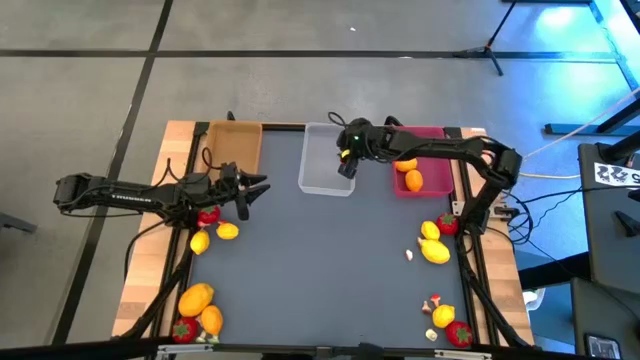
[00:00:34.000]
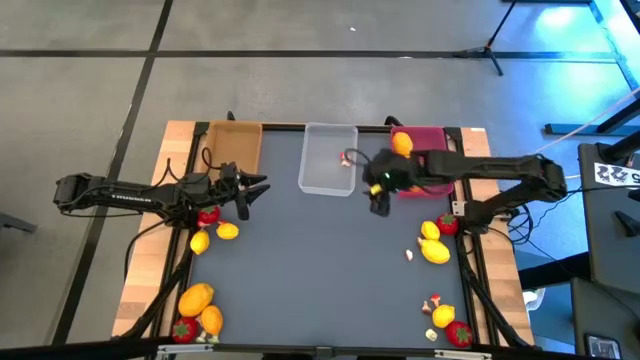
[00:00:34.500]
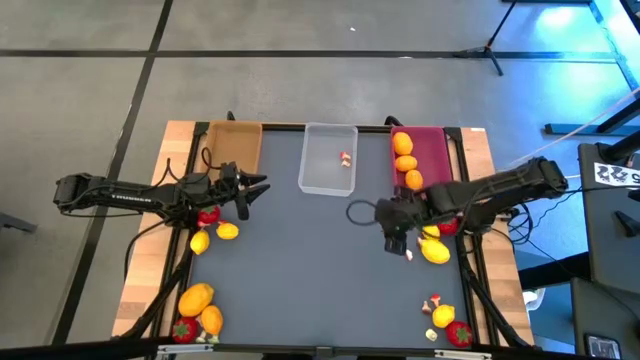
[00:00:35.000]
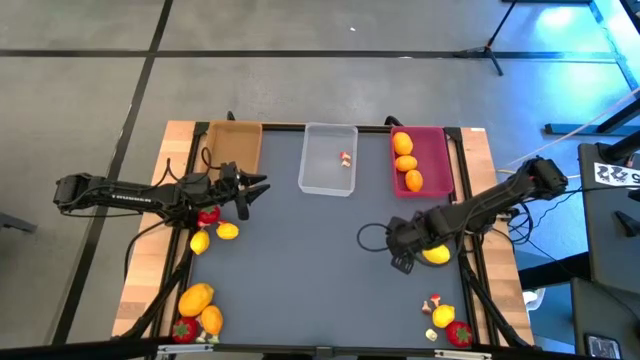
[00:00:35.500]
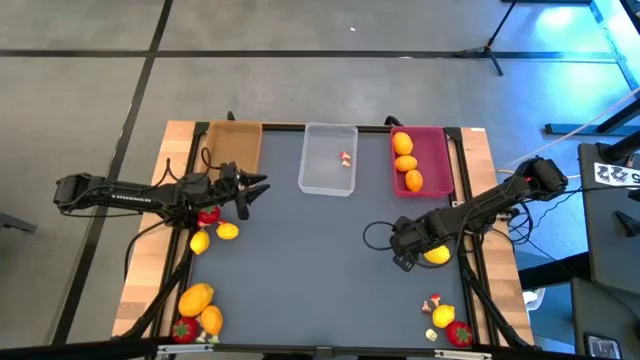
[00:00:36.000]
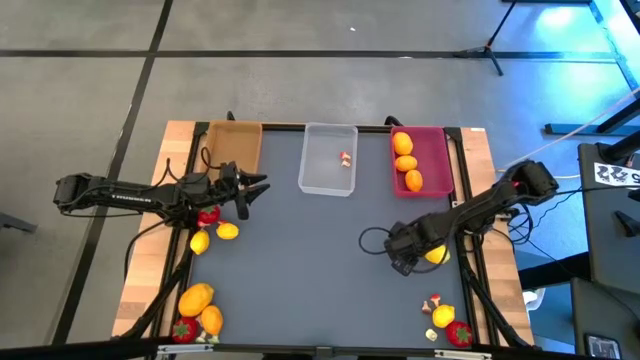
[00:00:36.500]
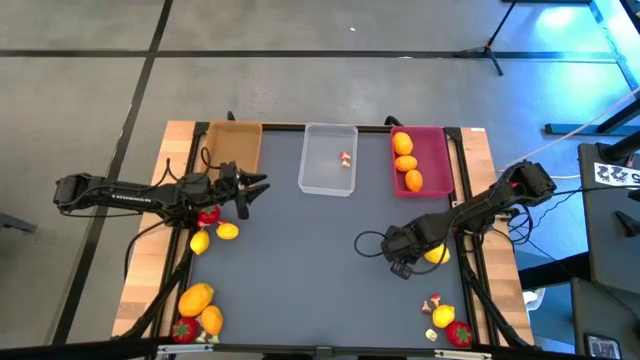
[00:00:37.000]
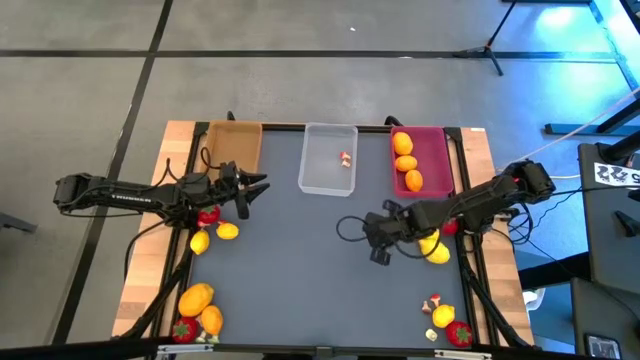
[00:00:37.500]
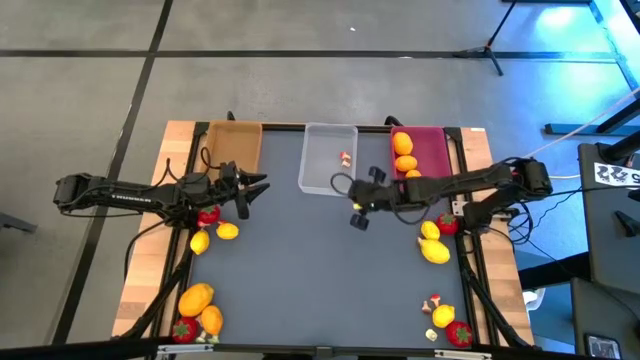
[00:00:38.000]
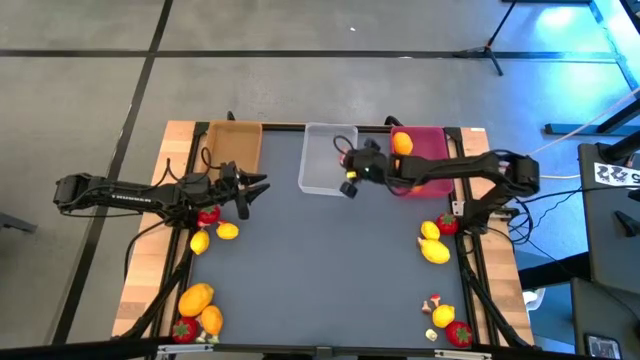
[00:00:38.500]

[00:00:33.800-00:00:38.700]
Task: Sort produce into baskets
Put the mushroom into the transparent bin

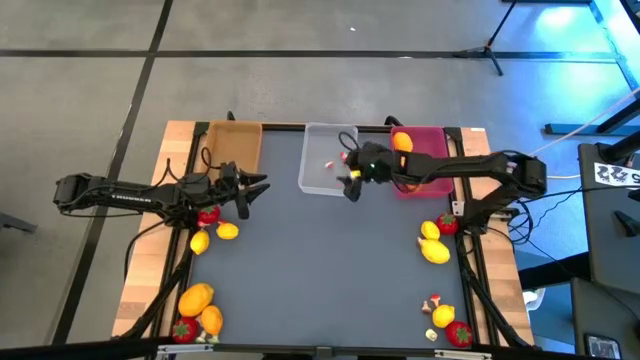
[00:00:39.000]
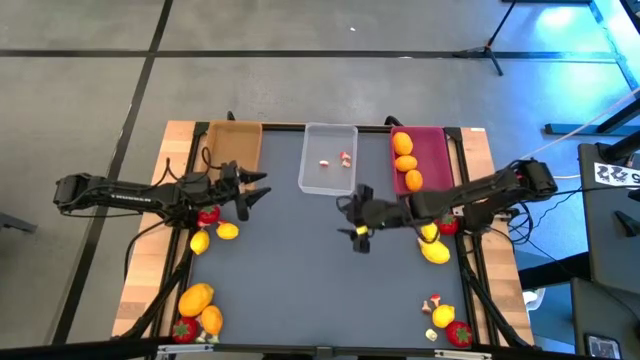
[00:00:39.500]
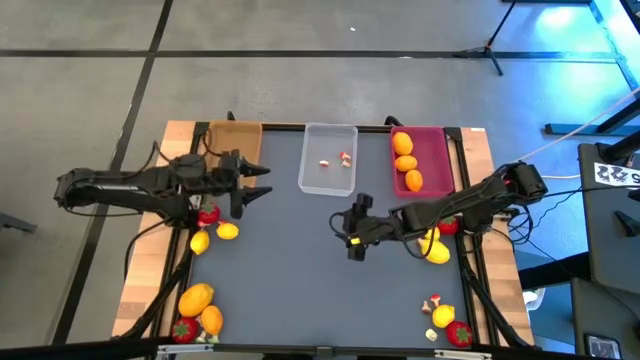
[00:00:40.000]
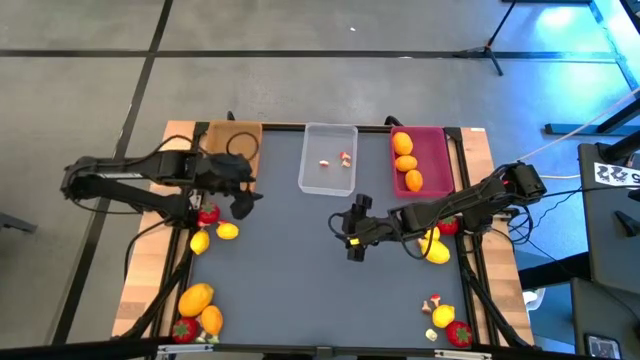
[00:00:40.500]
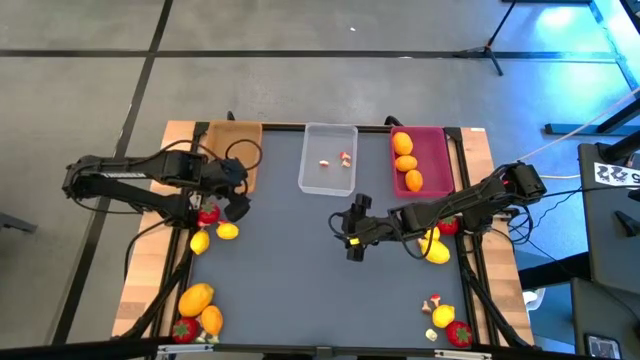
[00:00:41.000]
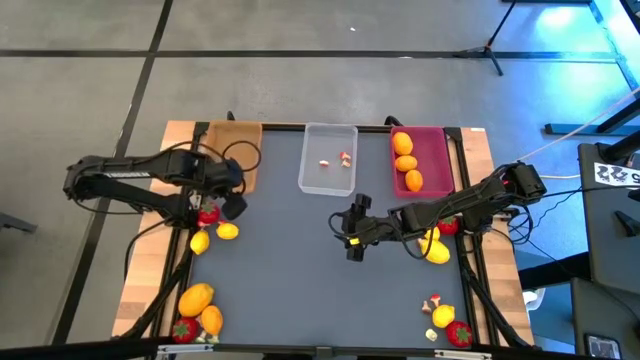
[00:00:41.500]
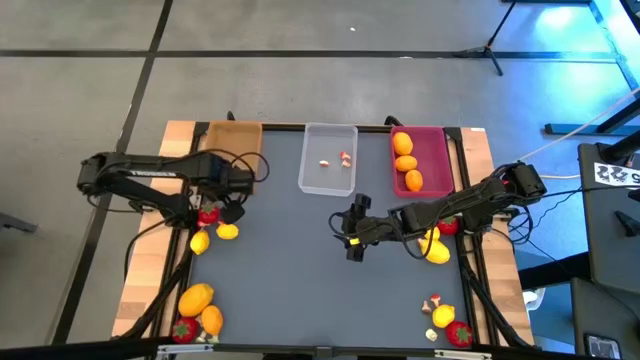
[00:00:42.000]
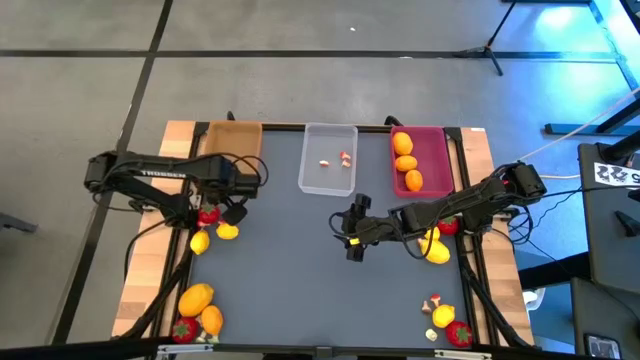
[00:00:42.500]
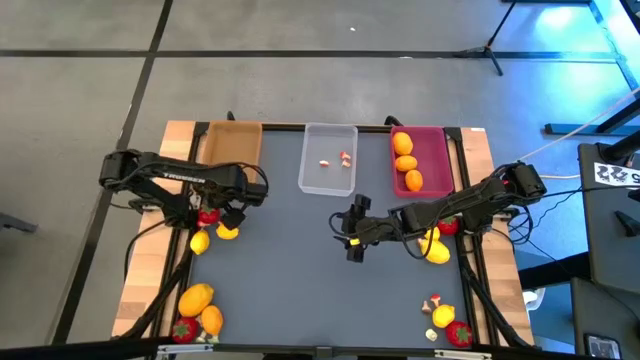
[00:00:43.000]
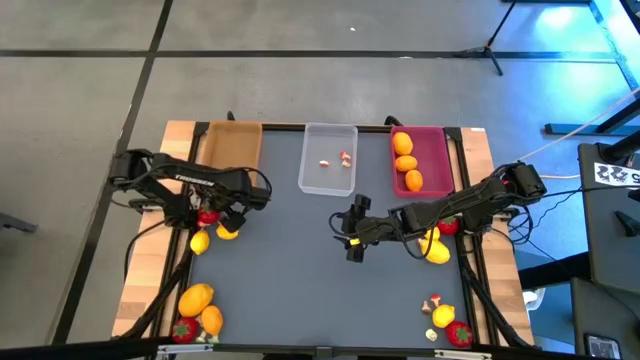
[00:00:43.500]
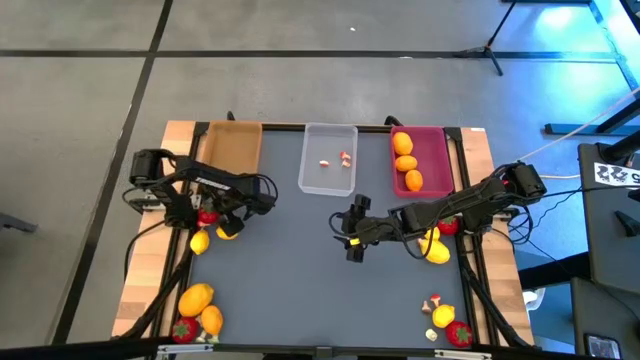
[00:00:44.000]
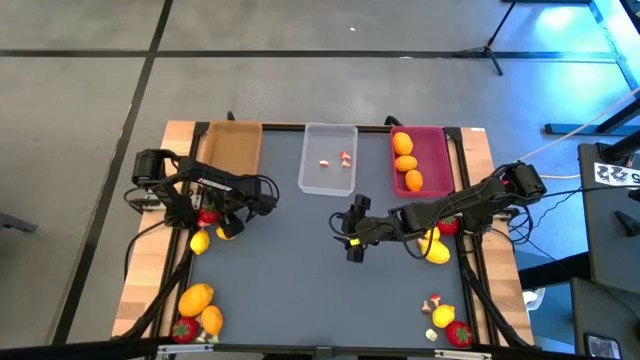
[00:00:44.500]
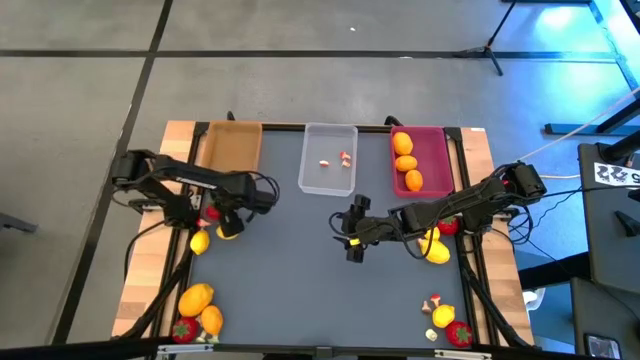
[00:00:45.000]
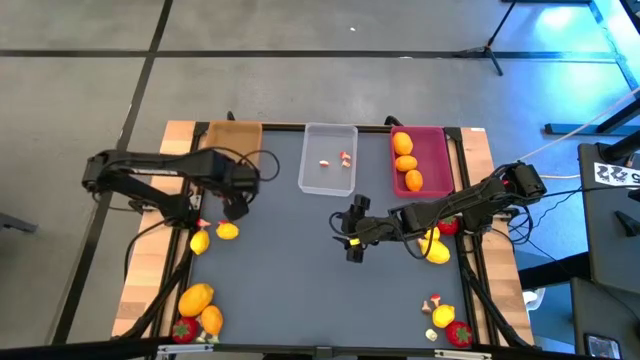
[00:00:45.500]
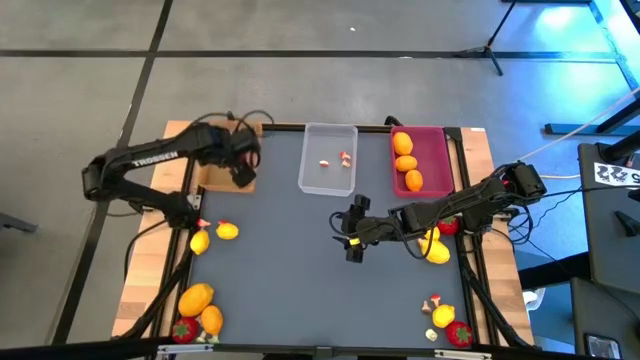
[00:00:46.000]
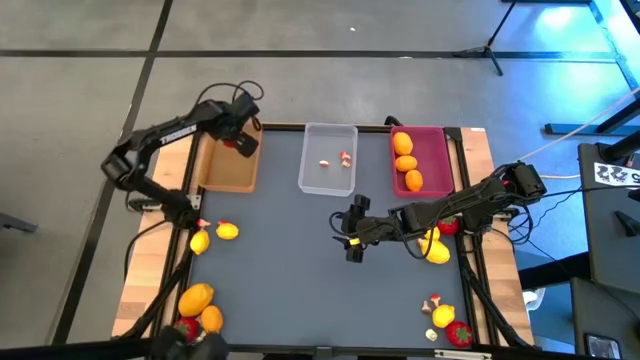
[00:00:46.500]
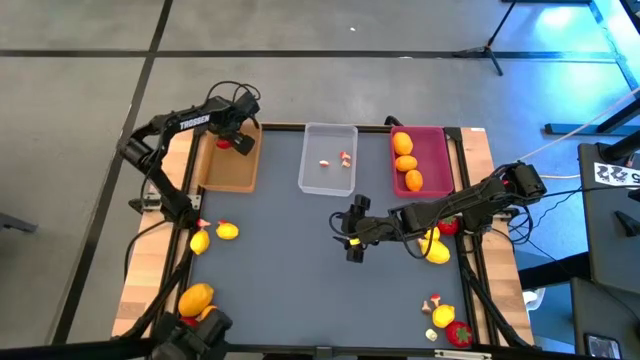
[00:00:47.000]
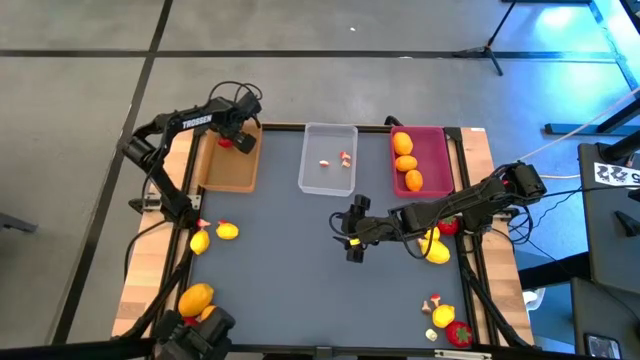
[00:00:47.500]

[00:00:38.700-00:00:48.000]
Put the tomato into the orange bin

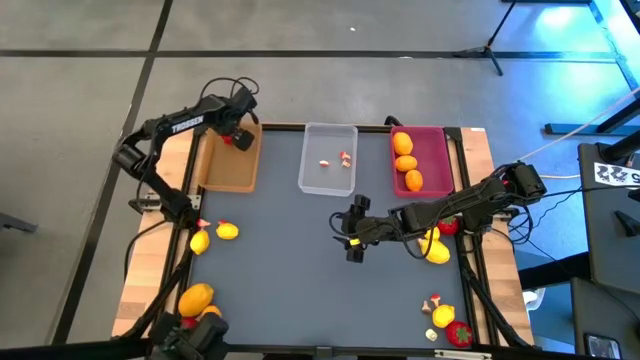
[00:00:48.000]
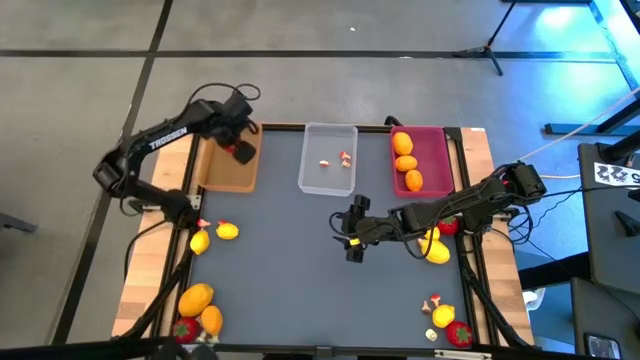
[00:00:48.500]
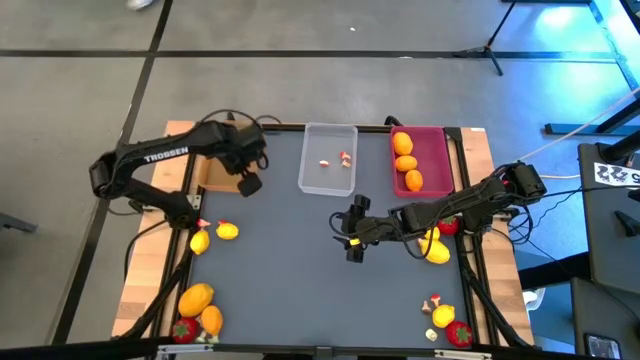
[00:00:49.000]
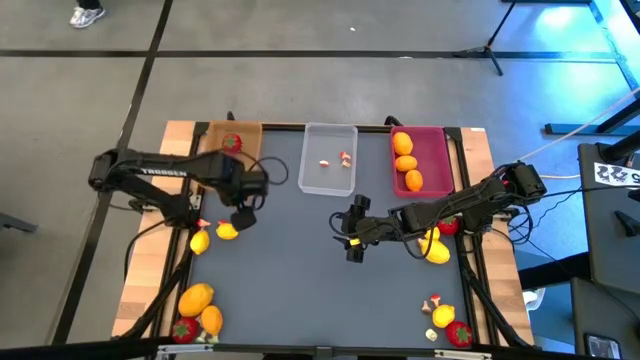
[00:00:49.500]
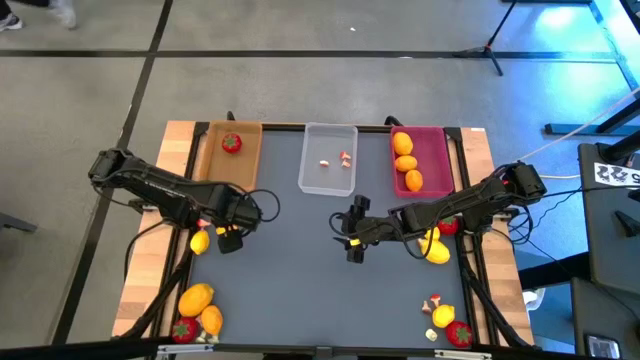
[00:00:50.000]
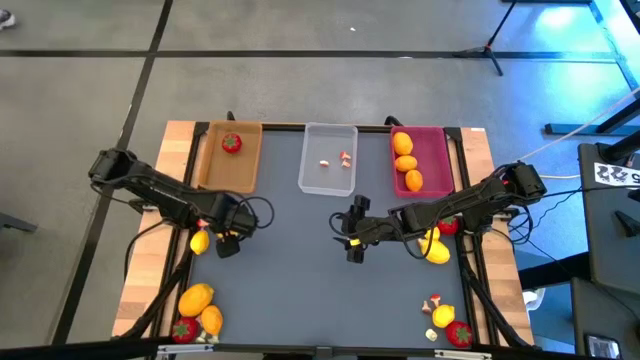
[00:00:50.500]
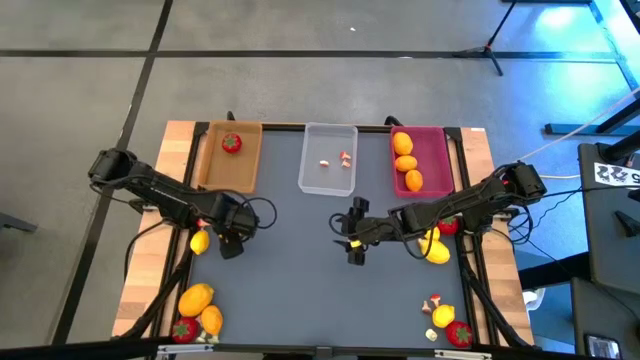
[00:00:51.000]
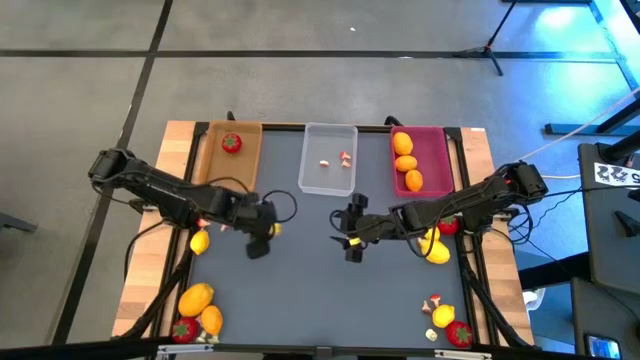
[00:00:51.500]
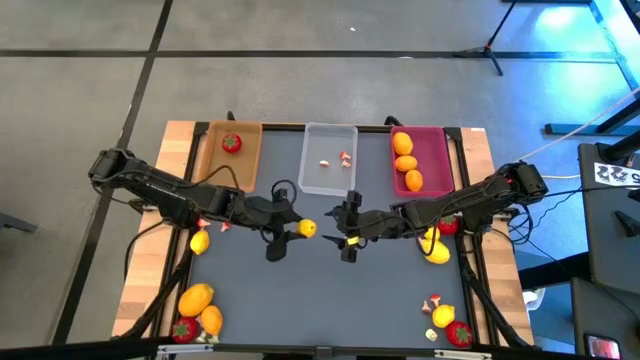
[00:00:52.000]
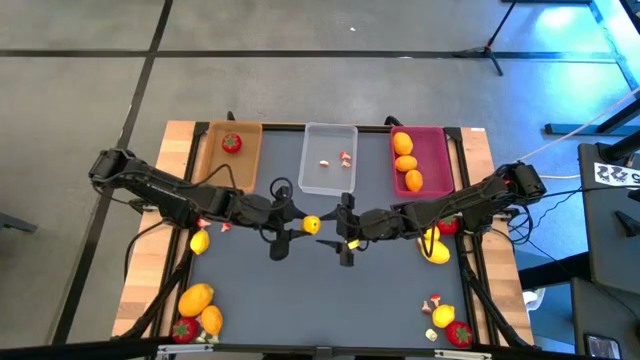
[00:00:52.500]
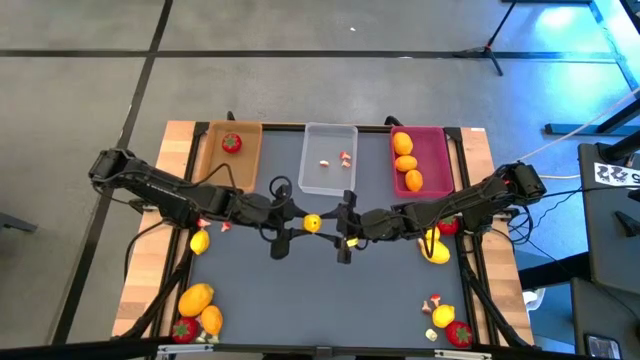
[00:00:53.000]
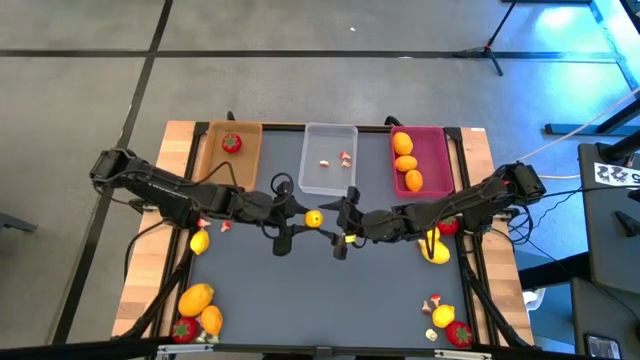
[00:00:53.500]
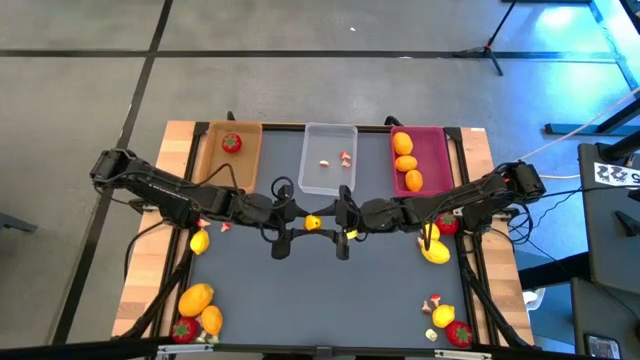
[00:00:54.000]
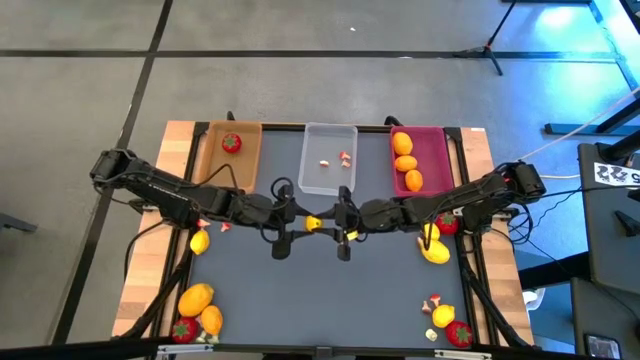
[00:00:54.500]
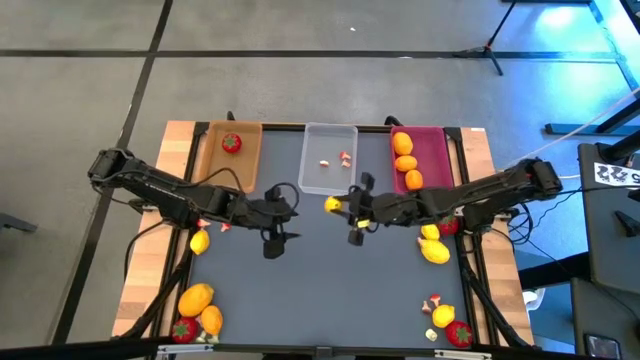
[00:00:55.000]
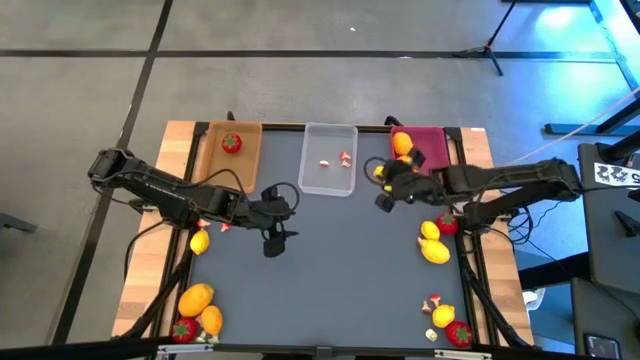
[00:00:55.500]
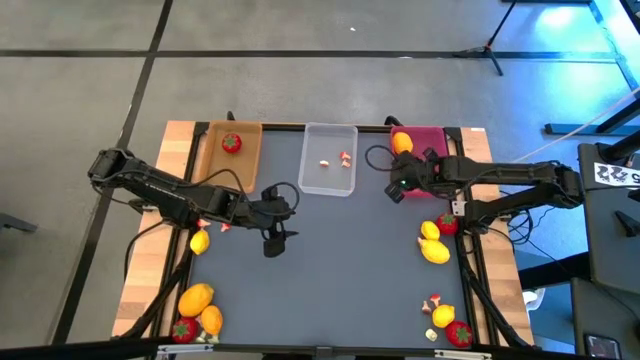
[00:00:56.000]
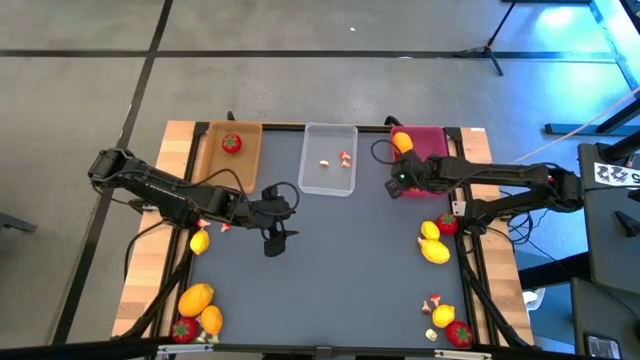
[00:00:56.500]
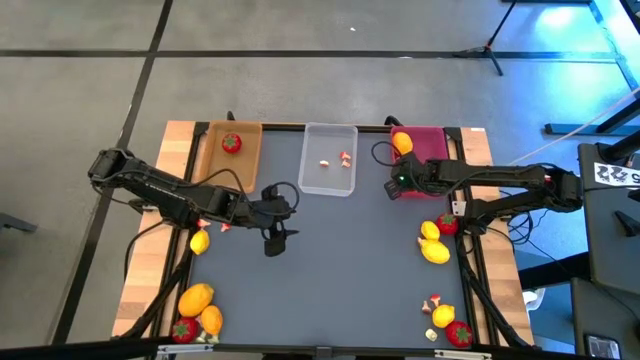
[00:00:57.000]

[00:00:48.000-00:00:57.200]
Put the lemon into the pink bin
